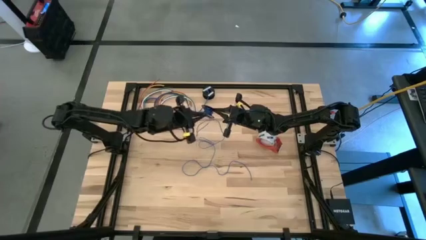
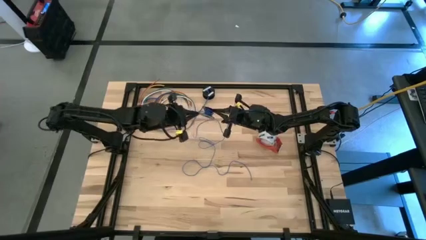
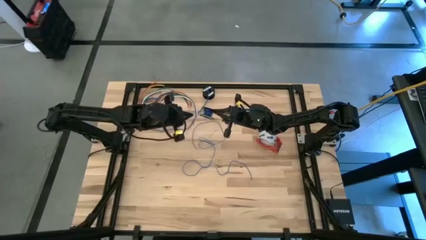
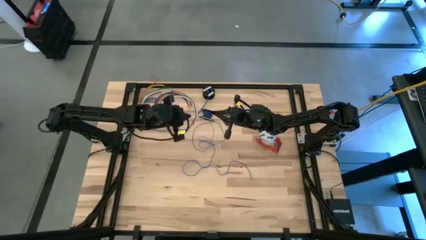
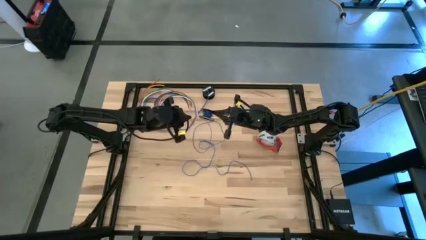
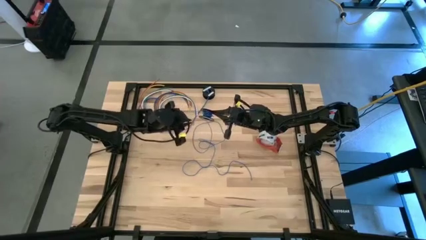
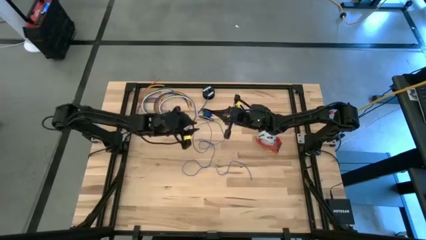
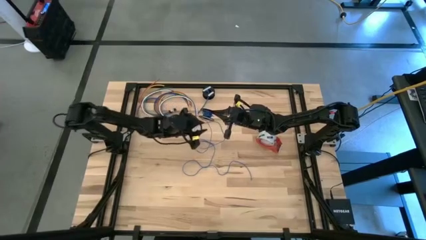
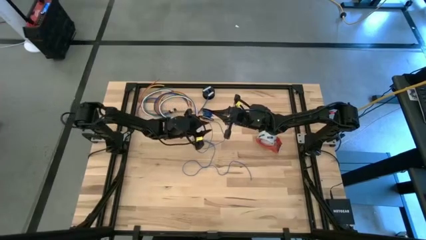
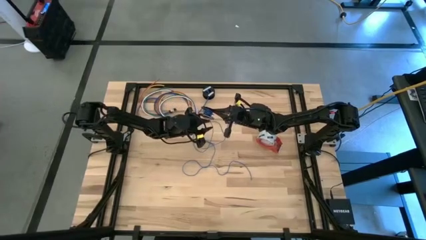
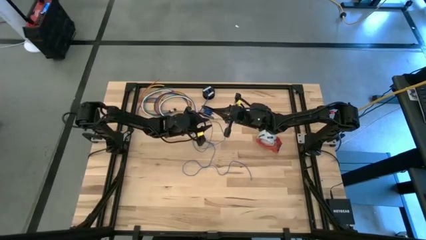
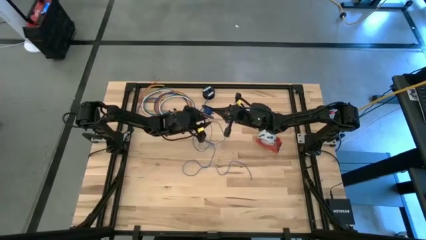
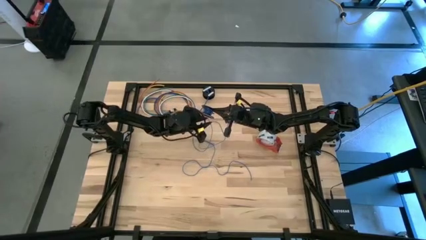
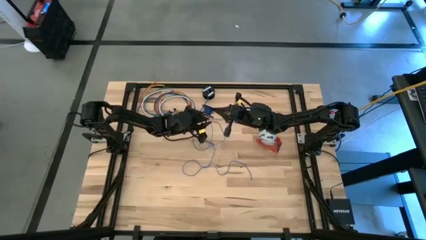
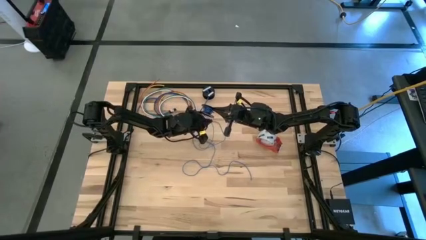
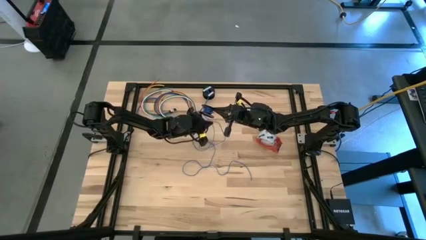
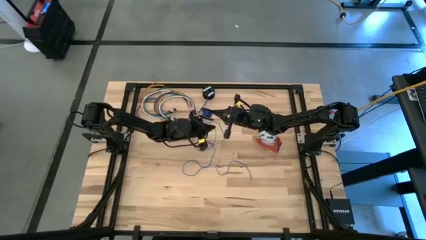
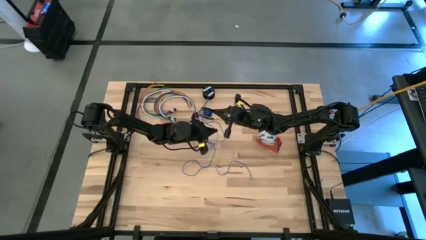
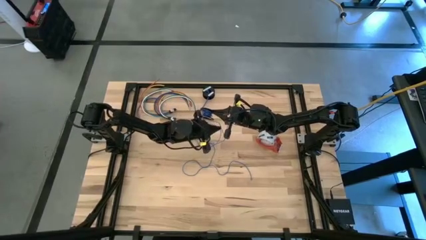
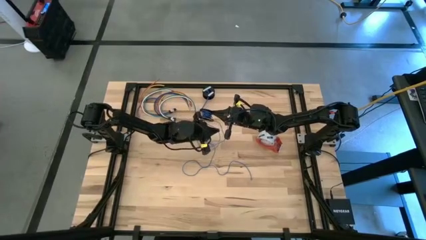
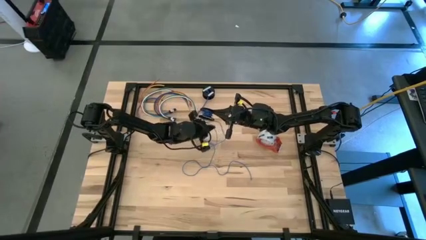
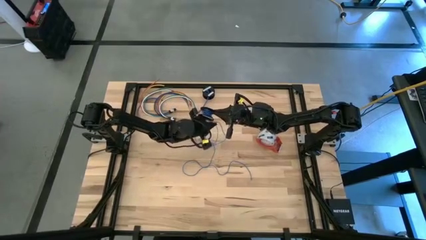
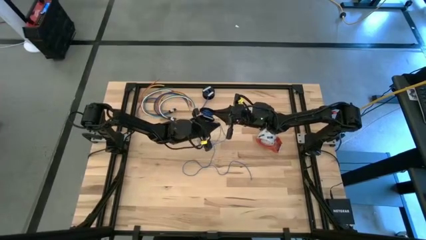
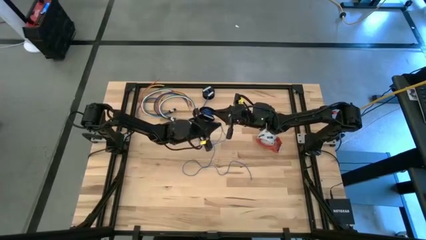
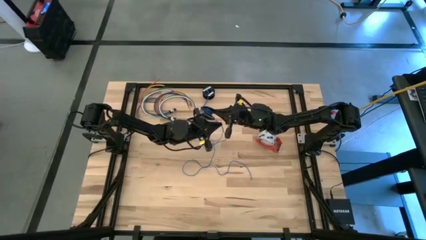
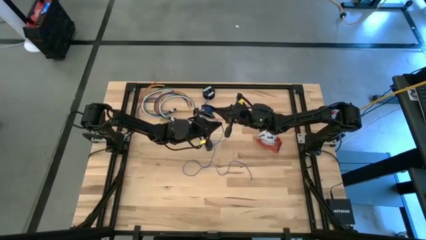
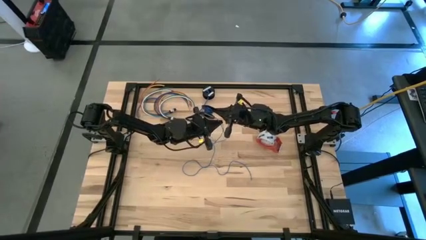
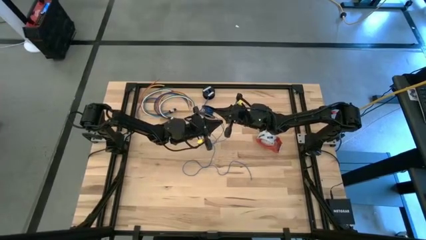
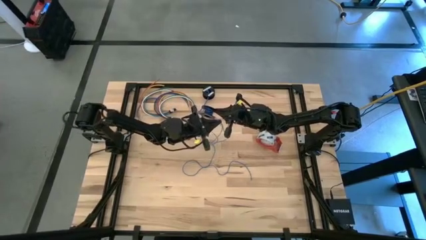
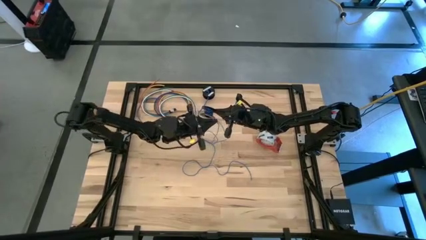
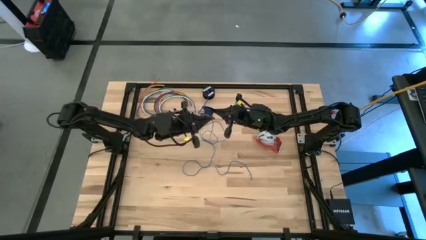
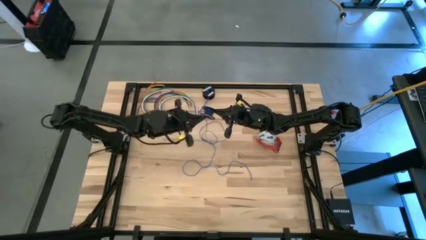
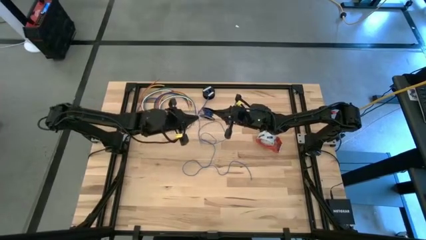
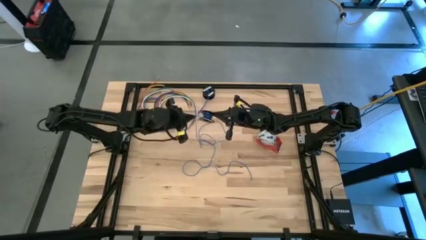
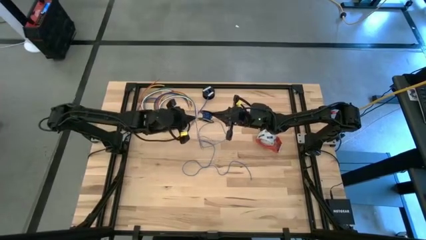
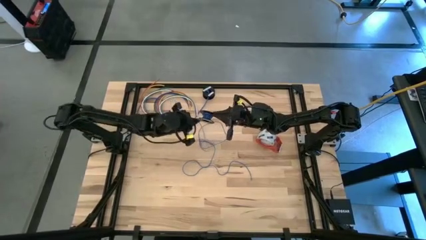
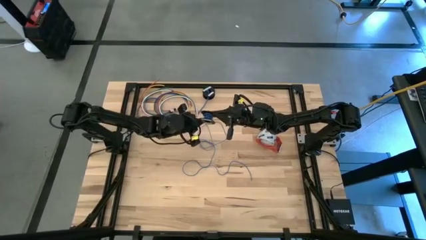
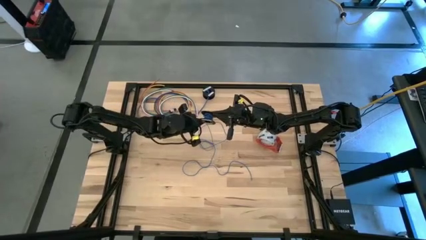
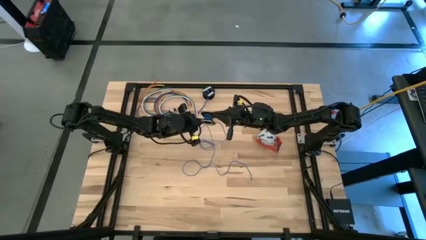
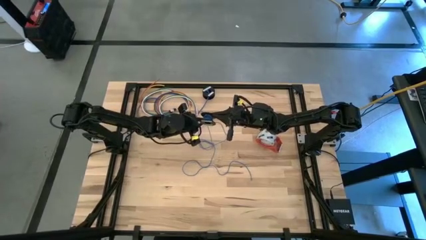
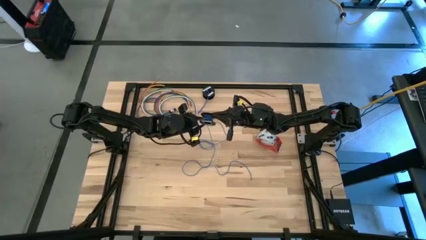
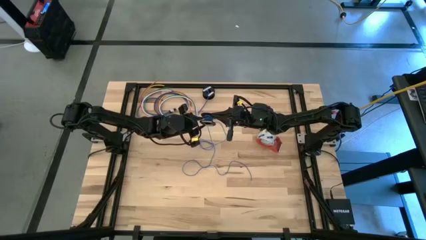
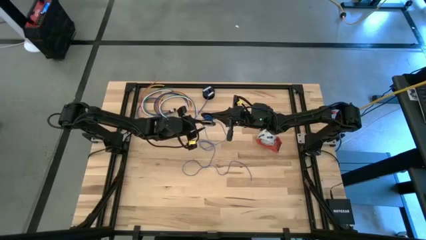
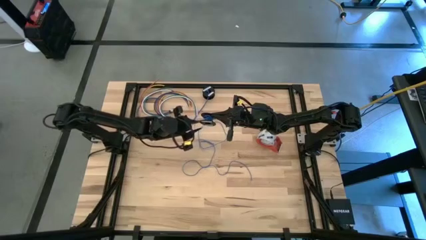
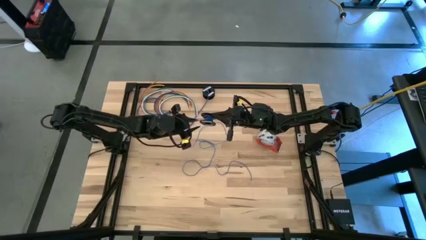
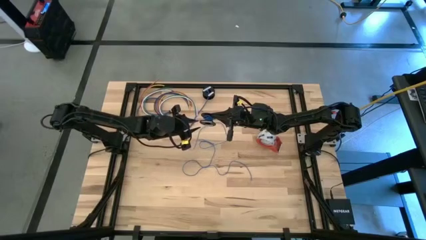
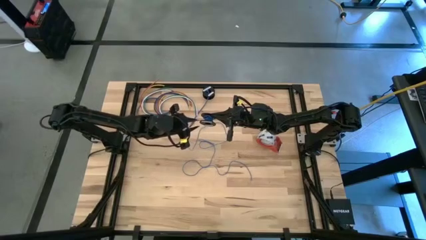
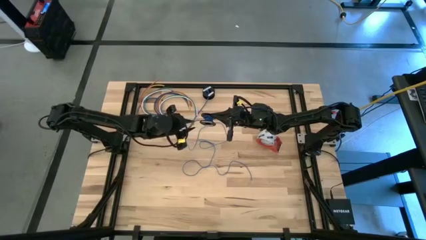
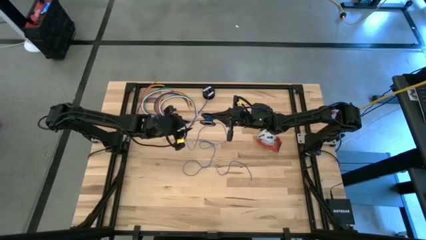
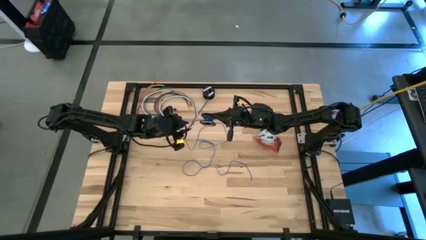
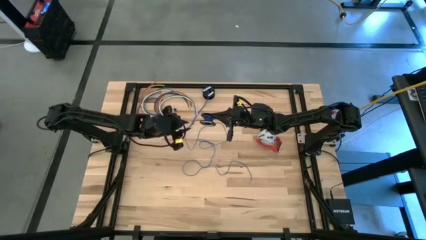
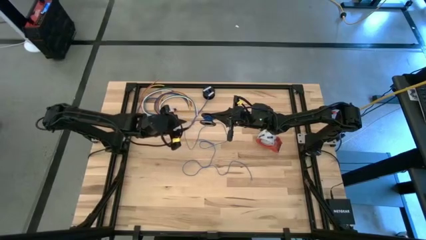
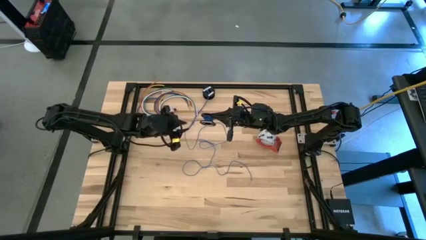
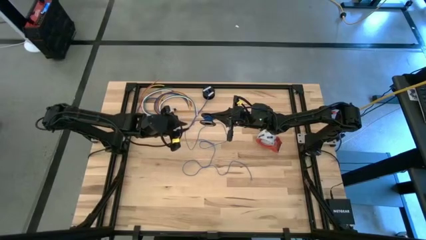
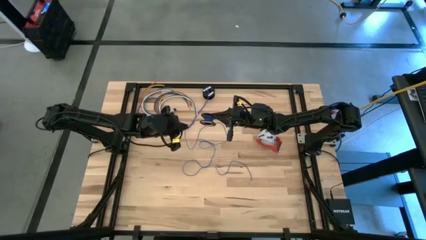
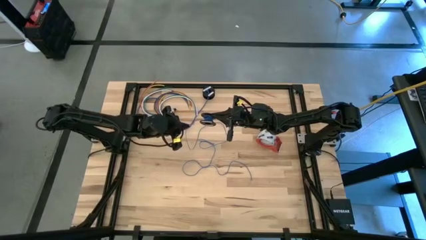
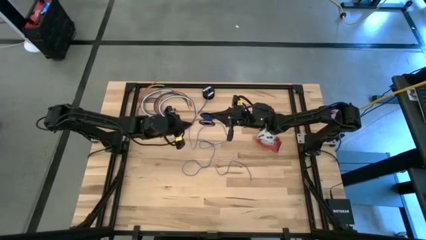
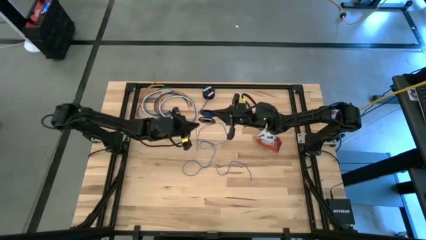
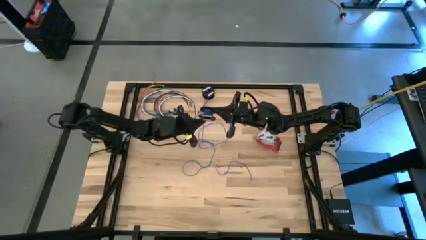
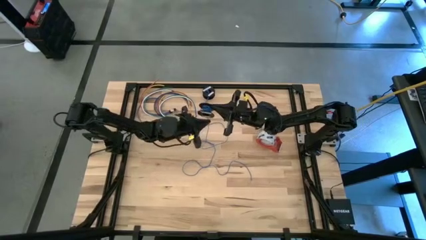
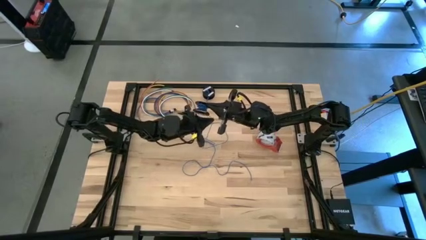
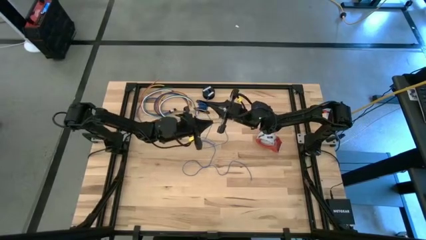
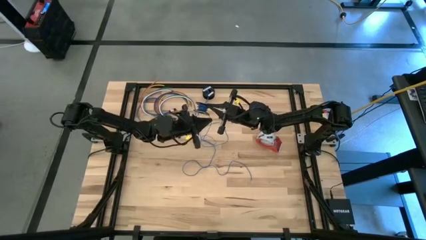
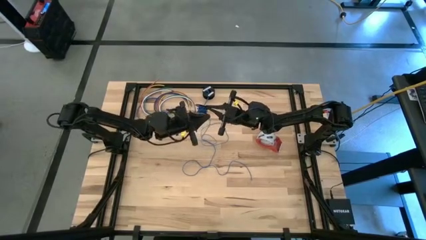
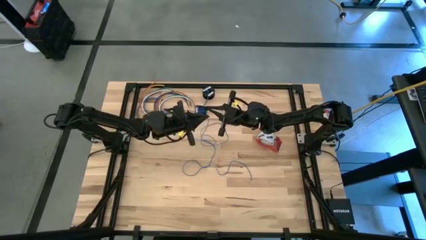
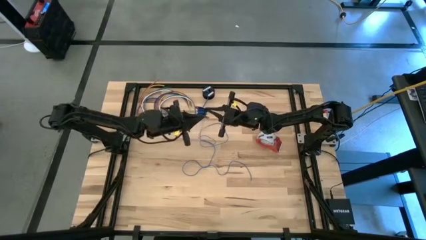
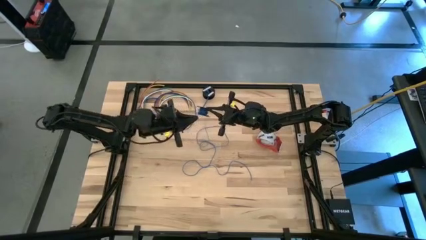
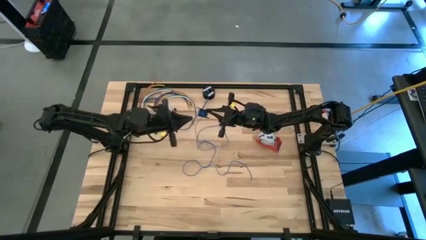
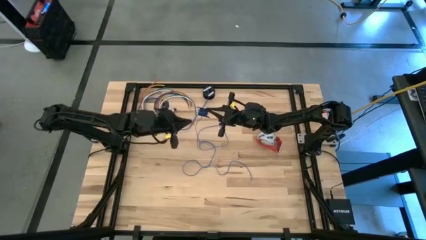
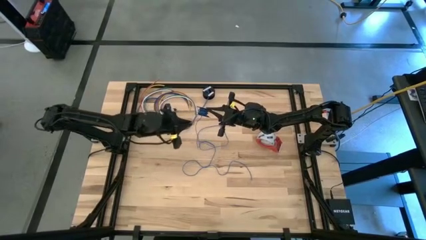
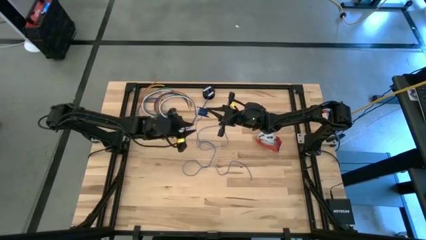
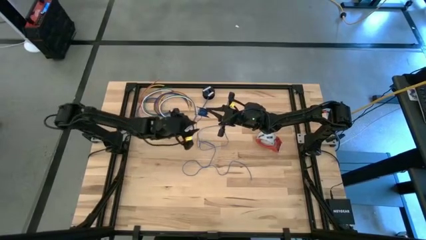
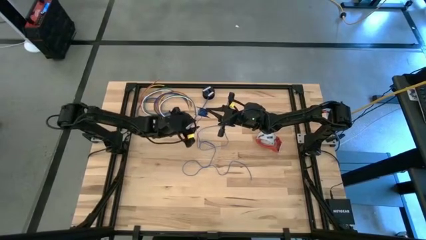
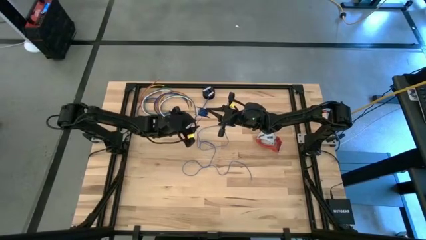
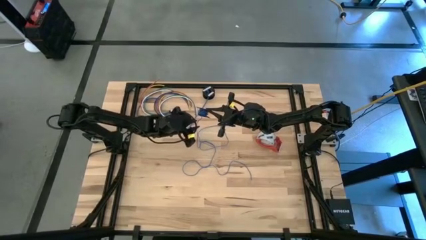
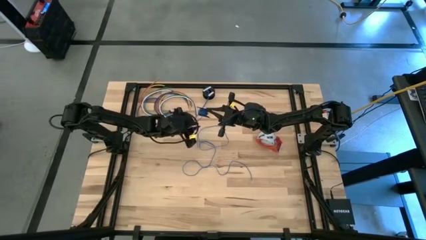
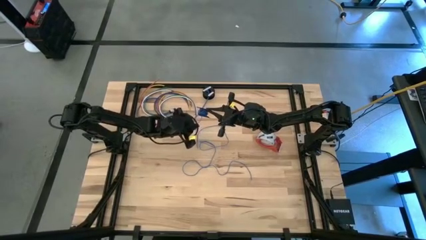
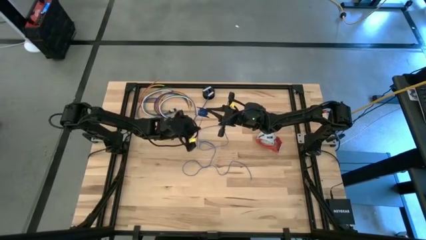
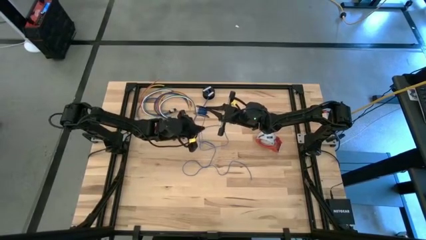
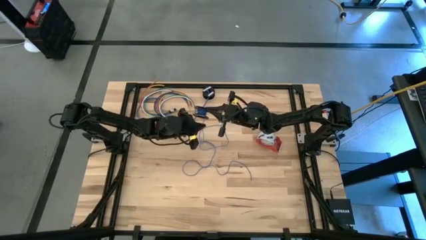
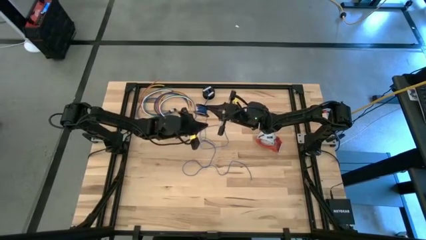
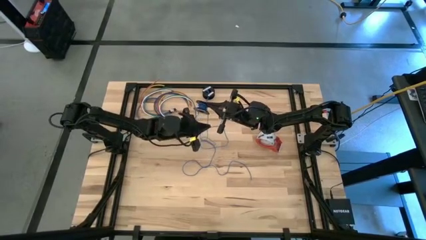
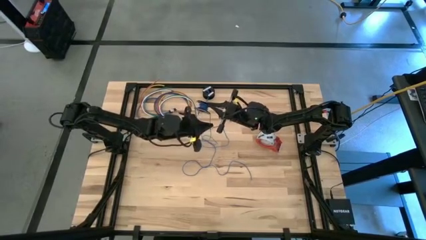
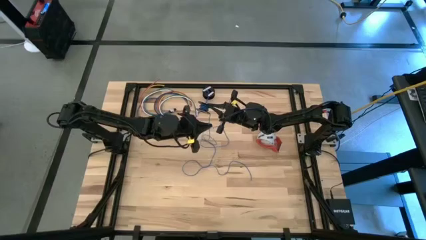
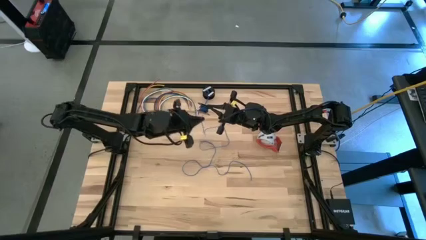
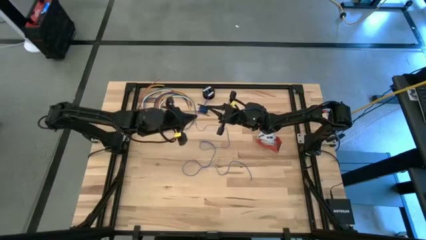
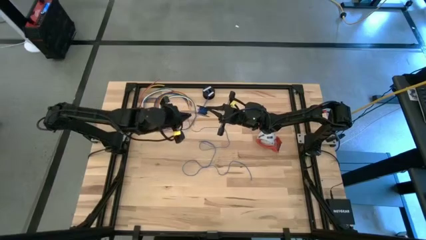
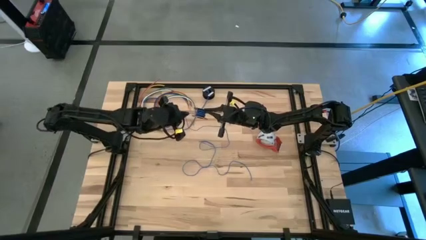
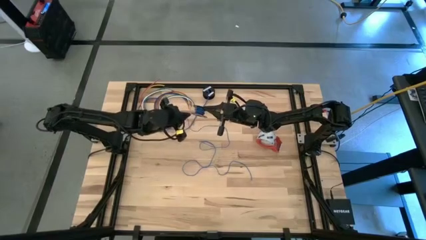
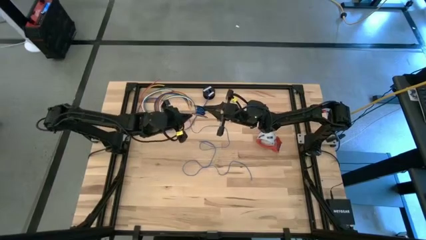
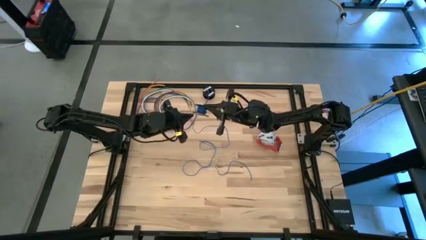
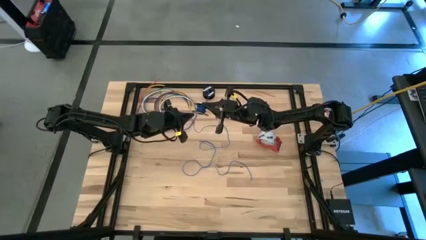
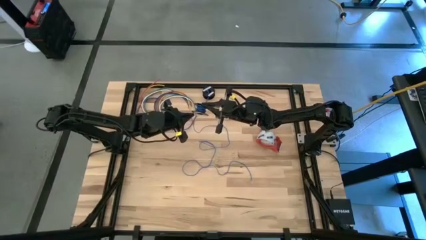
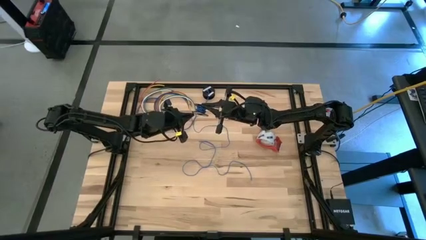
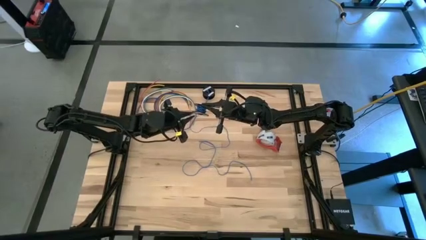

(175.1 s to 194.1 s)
Task: Coil cords
Coil the blue wire onto the spool
